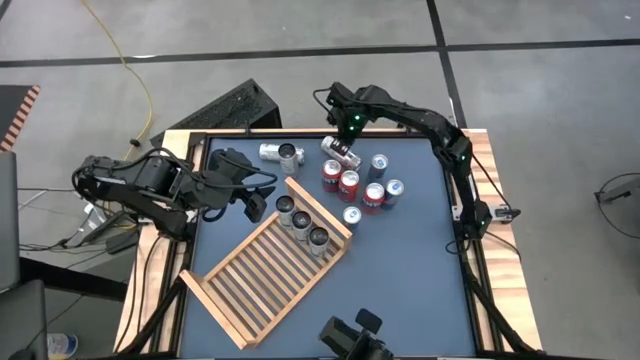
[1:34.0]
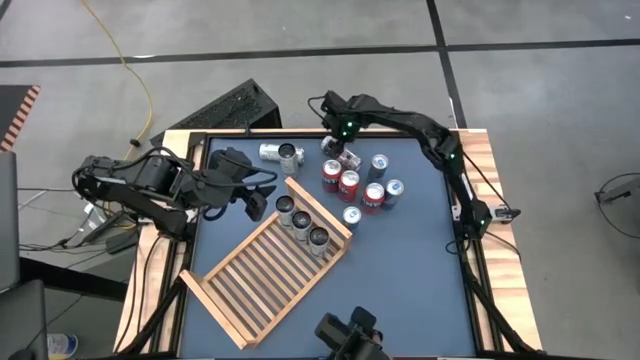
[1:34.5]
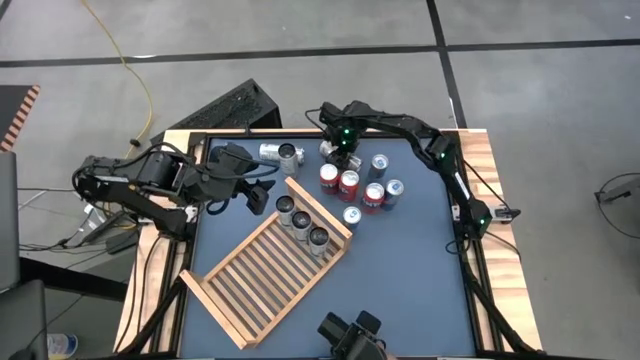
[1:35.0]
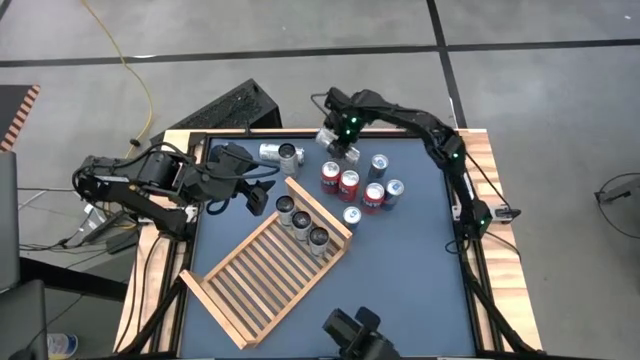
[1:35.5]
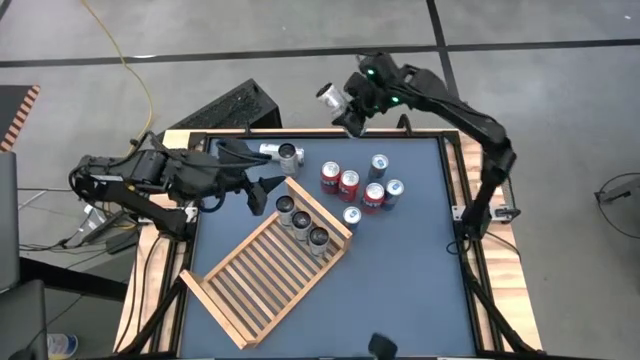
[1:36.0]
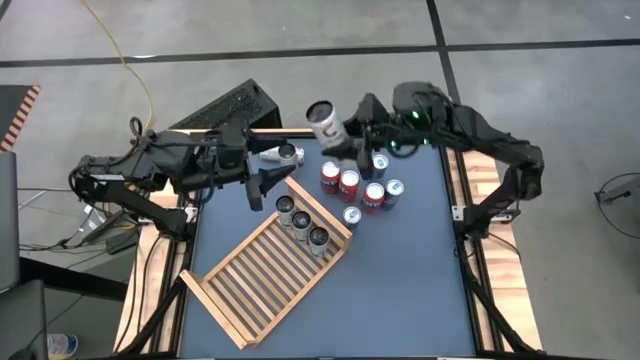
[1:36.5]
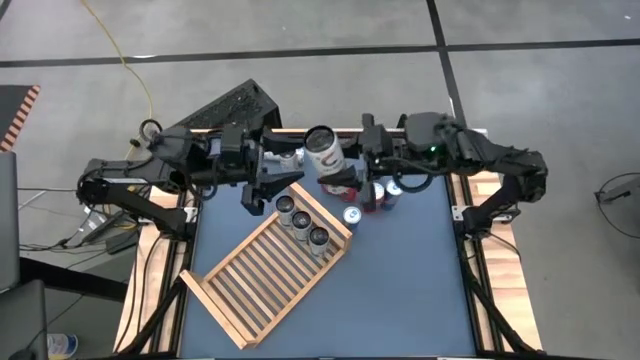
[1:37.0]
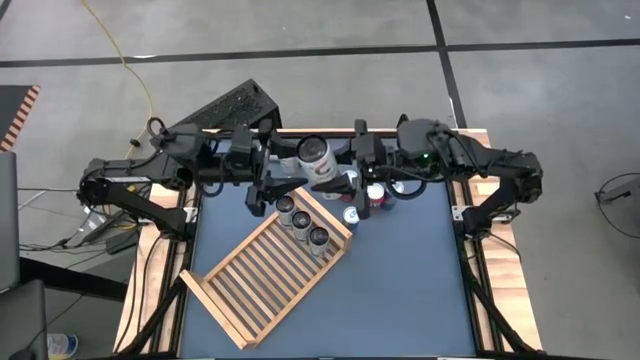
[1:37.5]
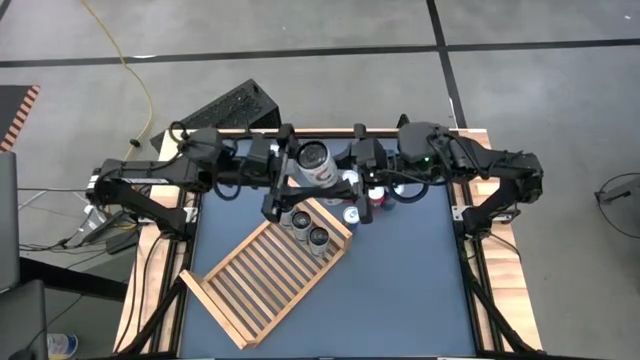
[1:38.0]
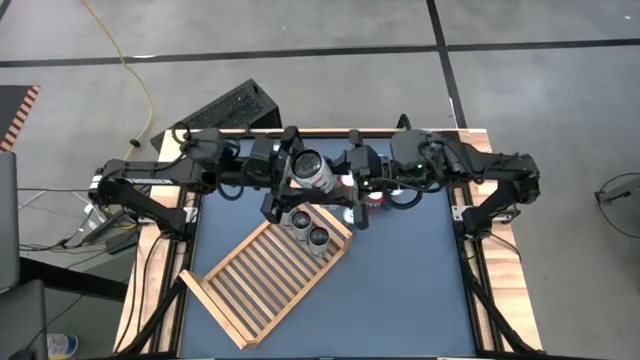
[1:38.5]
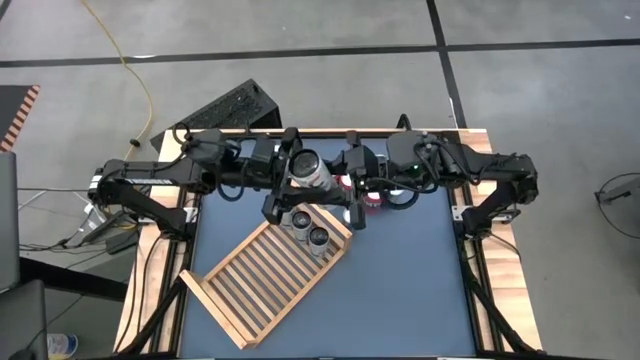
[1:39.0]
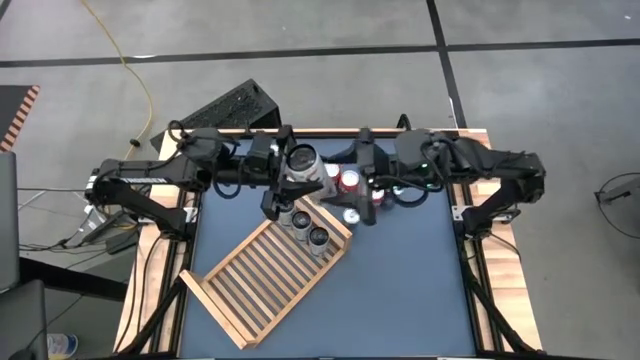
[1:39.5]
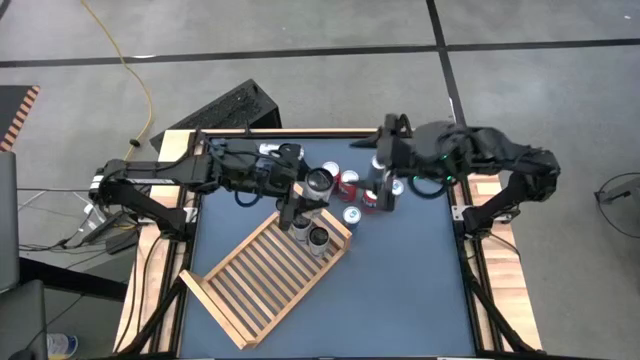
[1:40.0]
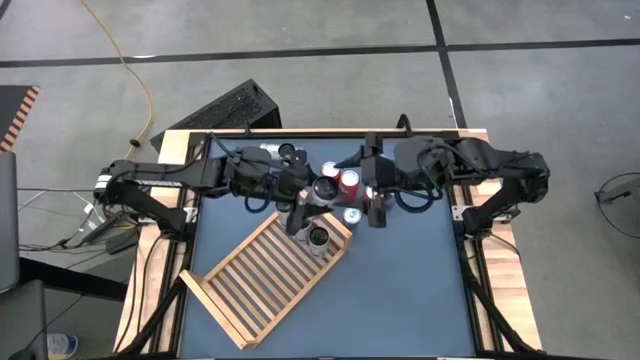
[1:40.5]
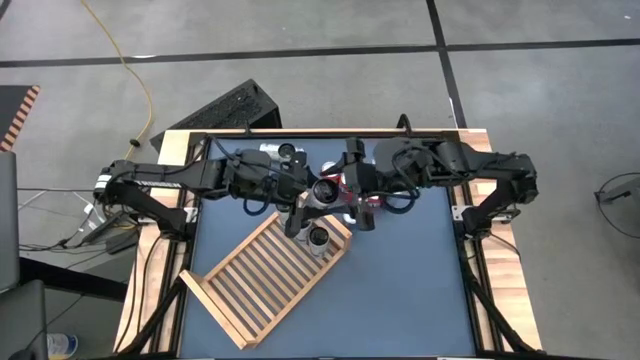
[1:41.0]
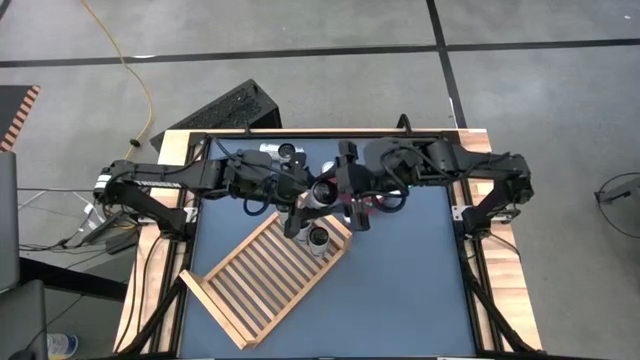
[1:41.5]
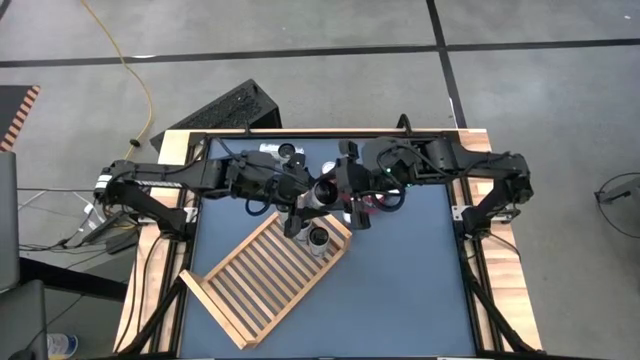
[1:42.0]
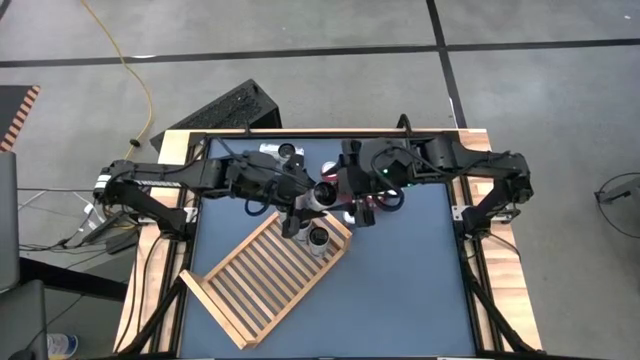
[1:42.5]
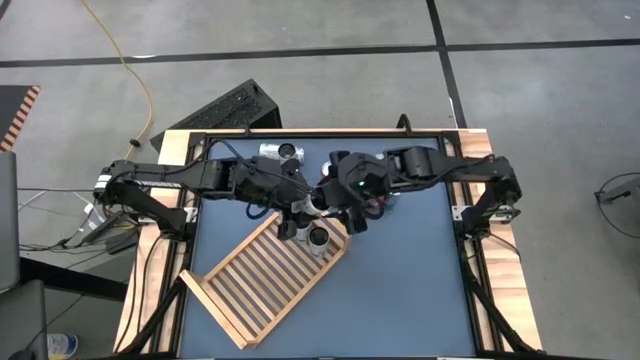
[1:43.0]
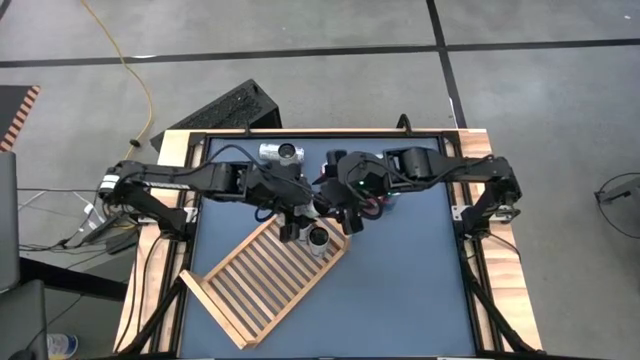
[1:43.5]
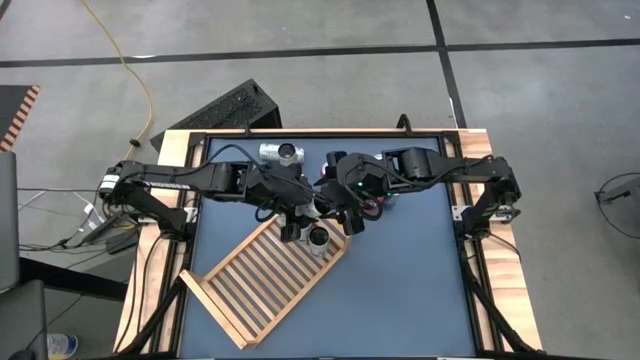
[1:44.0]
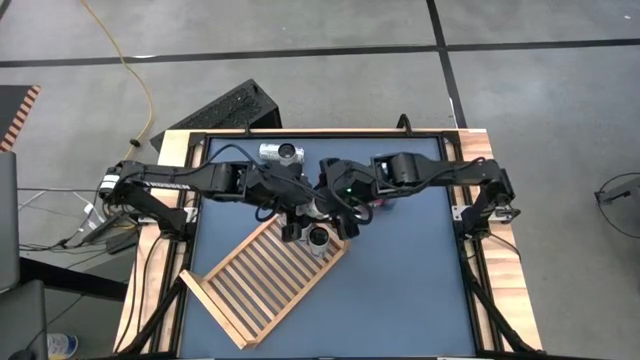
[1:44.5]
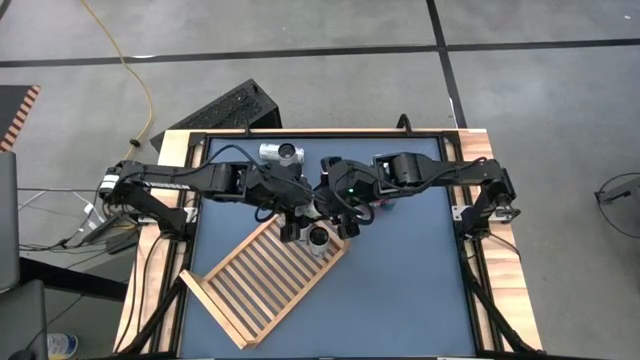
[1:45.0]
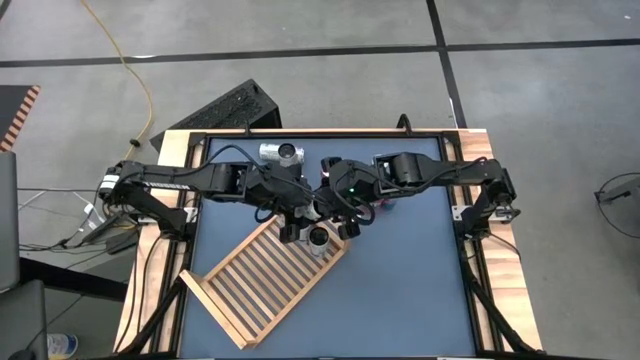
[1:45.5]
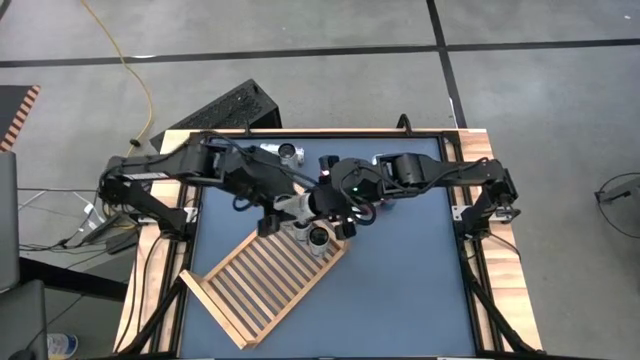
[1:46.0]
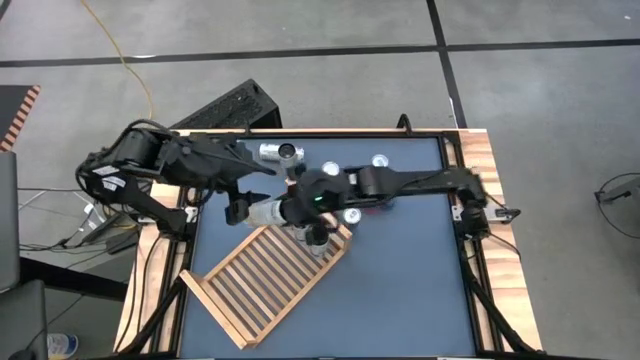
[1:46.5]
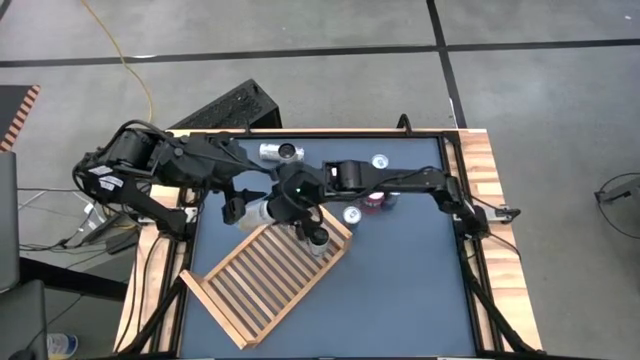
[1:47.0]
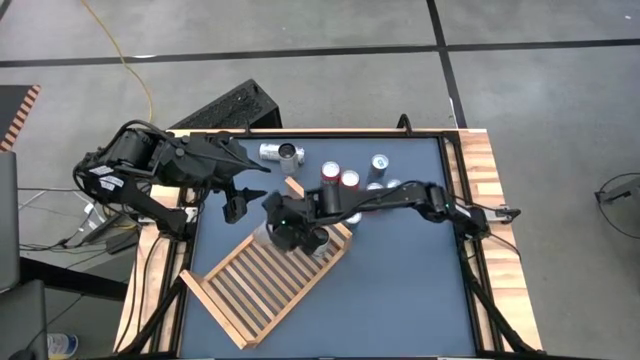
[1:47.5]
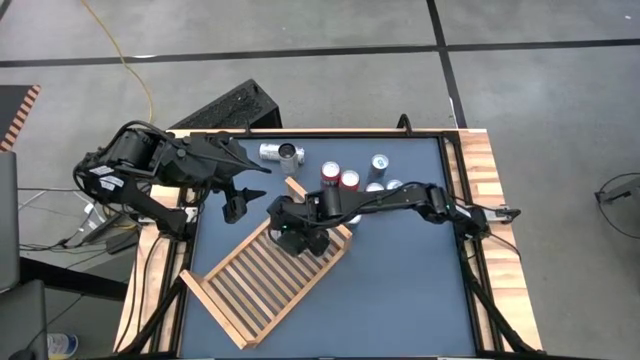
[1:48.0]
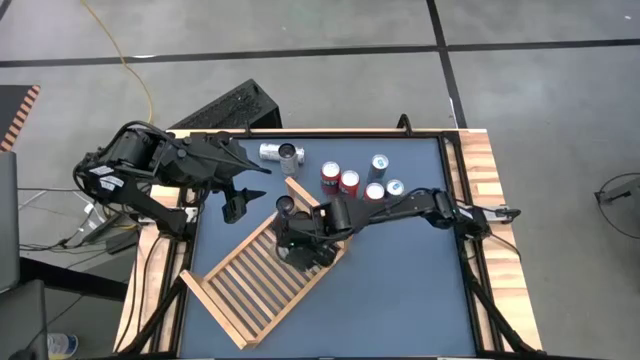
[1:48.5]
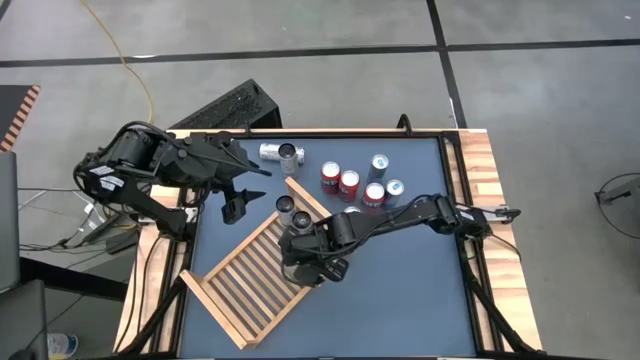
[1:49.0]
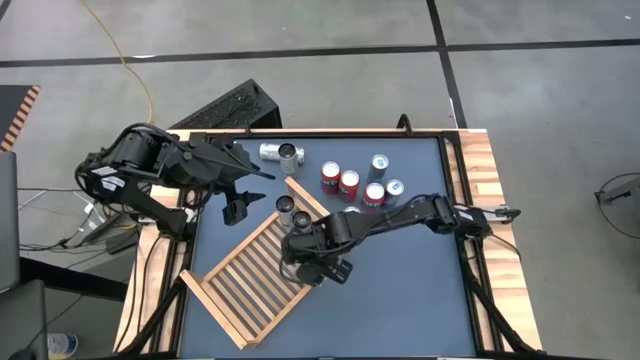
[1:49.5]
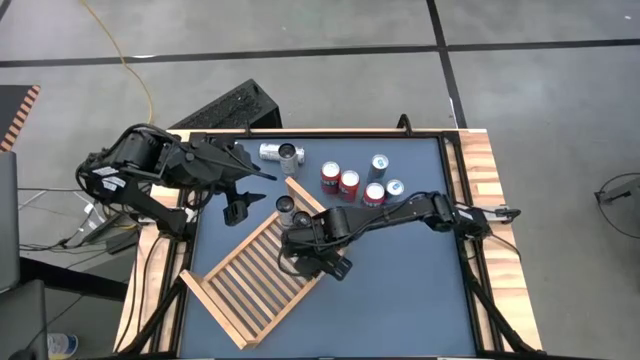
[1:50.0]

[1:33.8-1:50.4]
Task: Place canned beverage on shelf
Put the top right white yellow soda can on the shelf

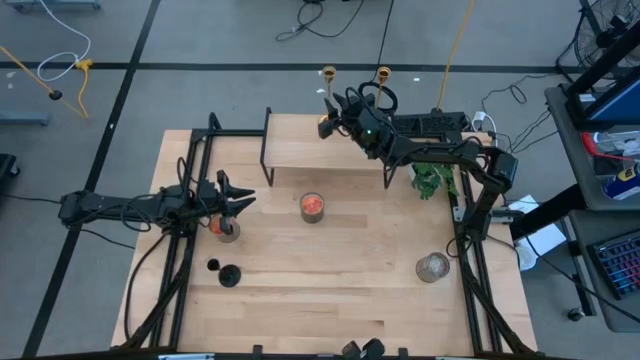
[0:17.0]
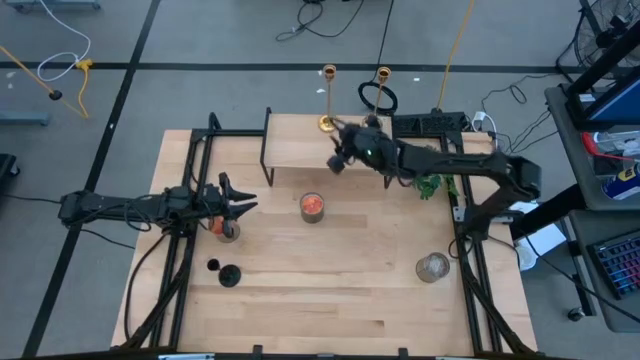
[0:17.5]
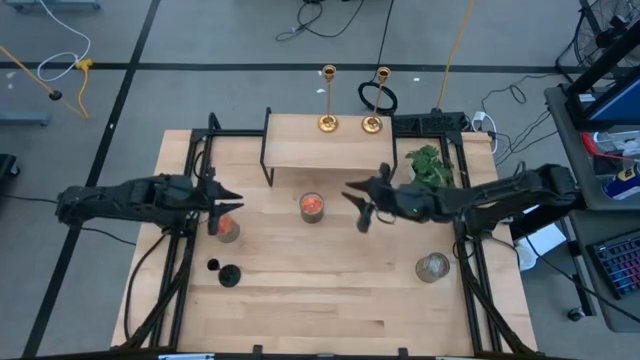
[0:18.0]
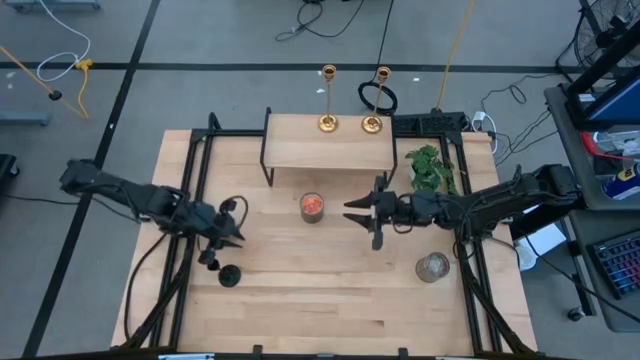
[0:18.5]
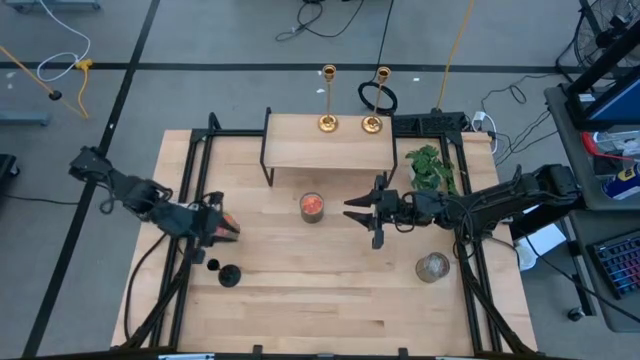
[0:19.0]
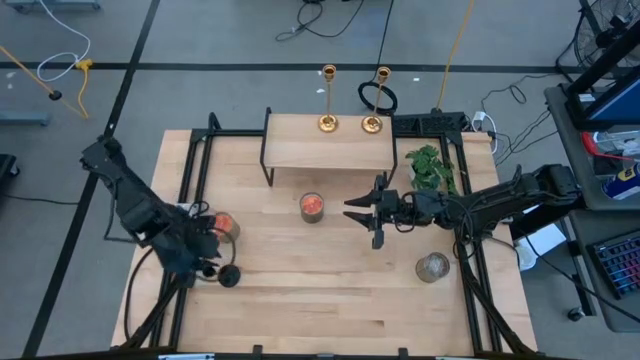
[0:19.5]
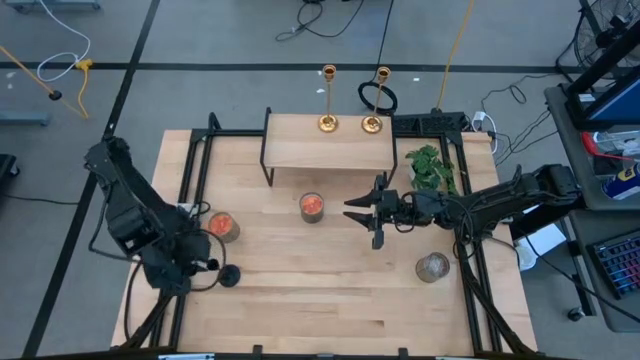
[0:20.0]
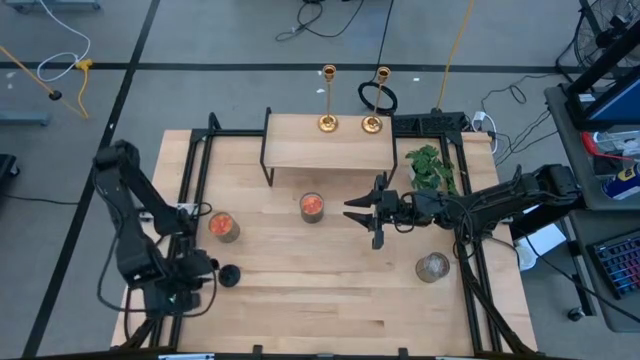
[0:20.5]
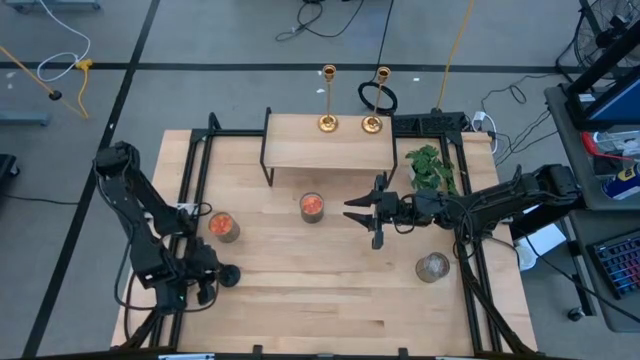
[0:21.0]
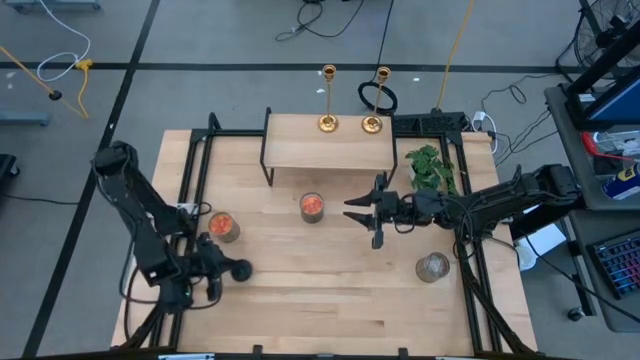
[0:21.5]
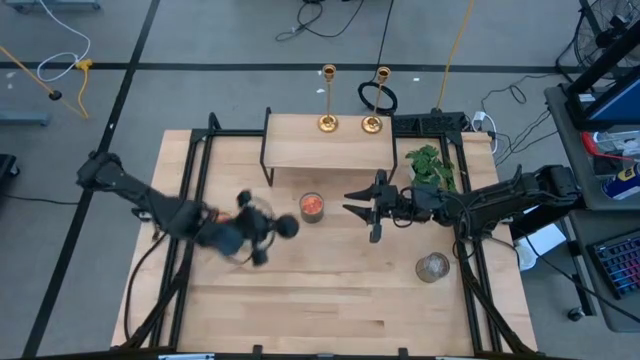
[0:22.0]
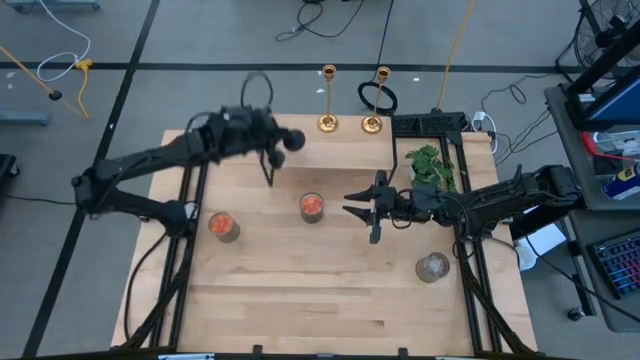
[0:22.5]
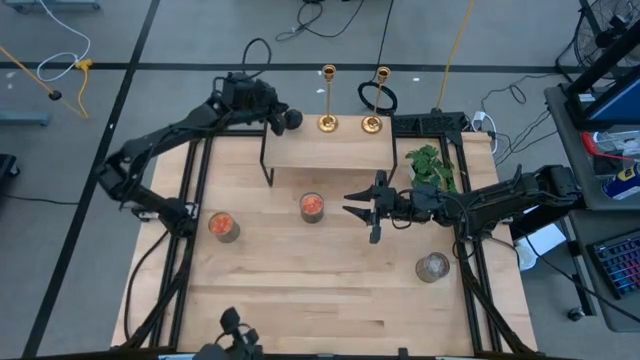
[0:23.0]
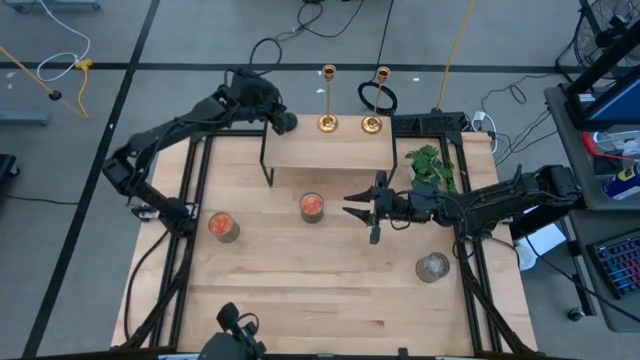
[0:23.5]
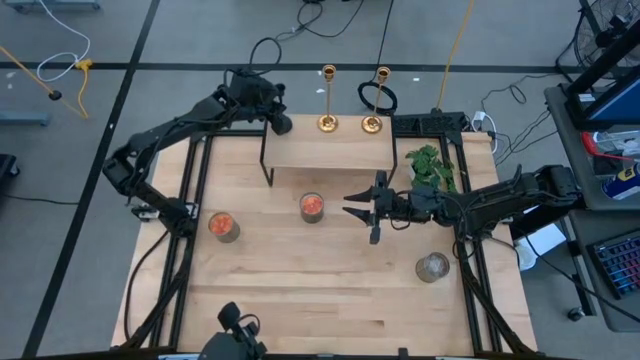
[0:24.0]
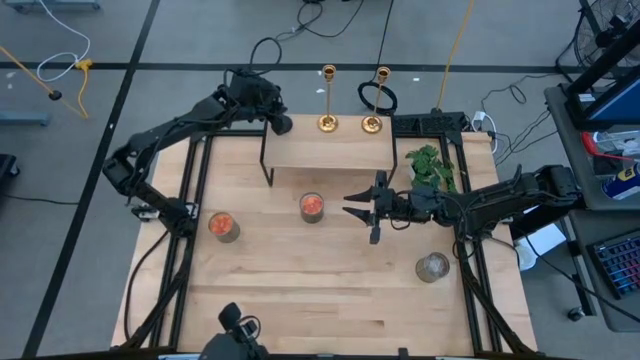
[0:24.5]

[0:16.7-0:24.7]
Task: Pick & Place candle stick holders
Put the black candle holder on the shelf
